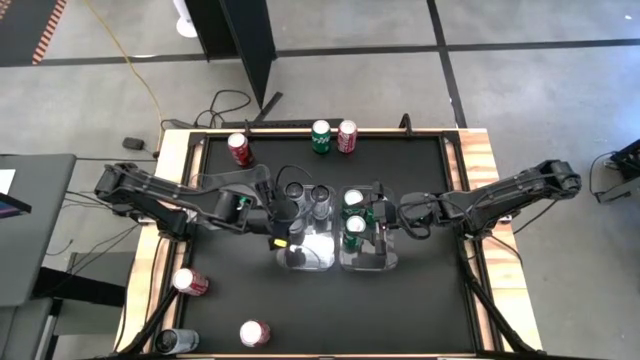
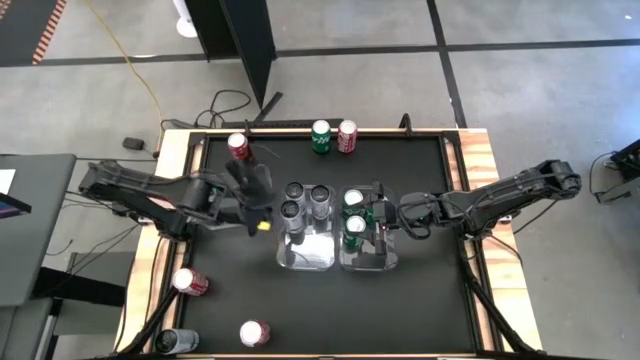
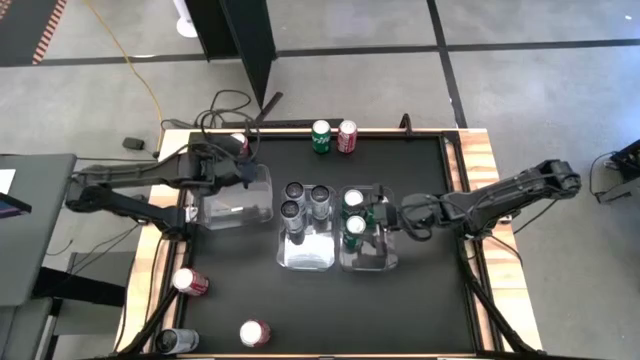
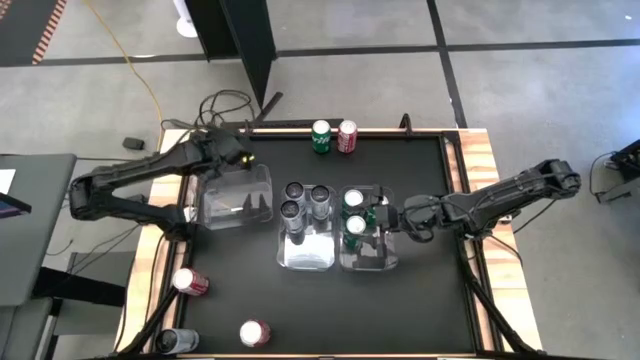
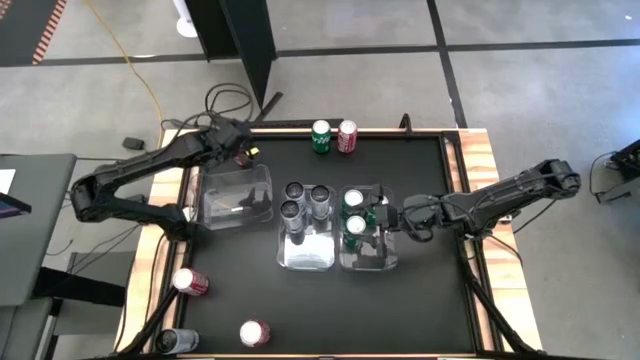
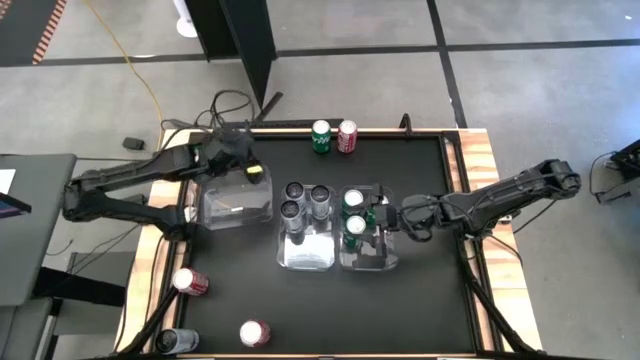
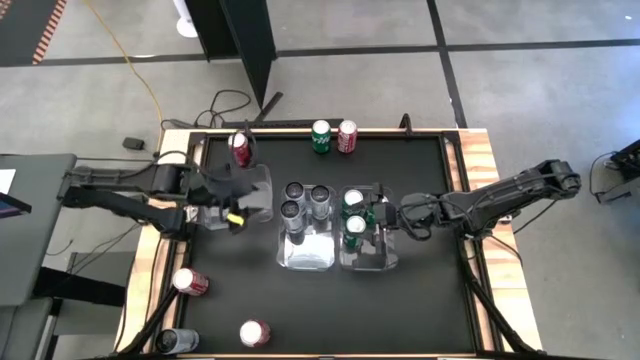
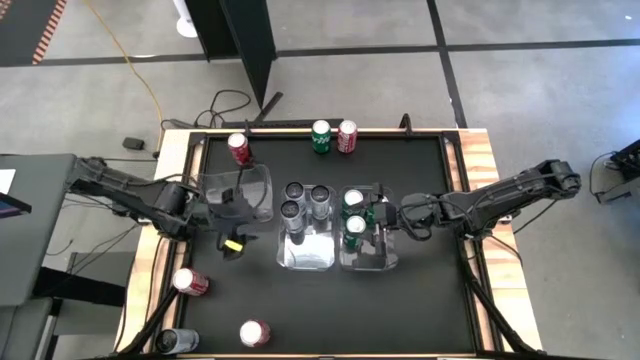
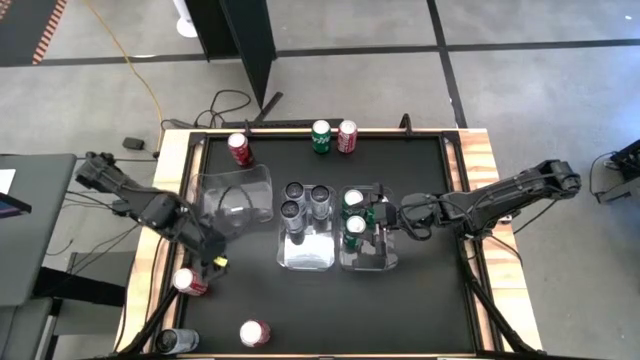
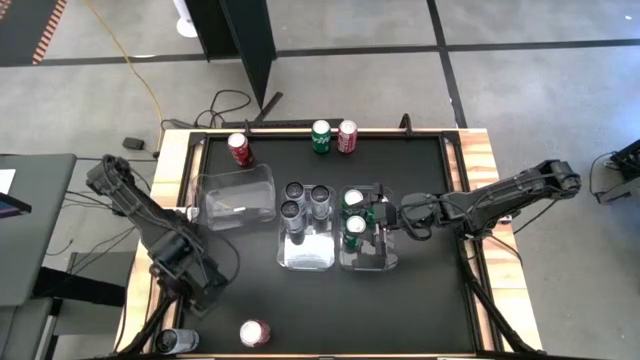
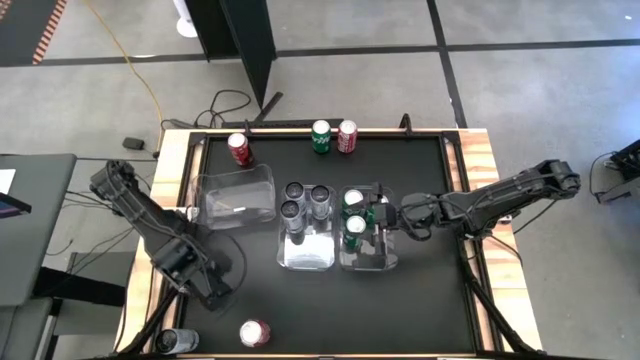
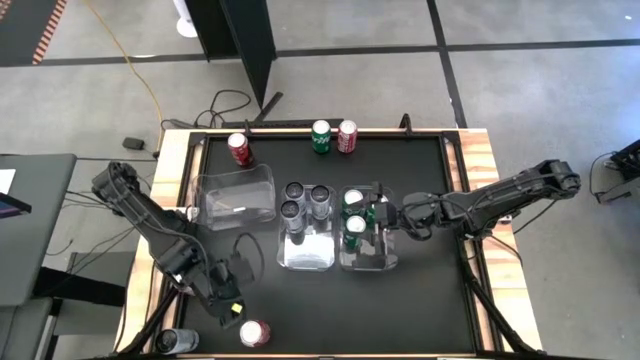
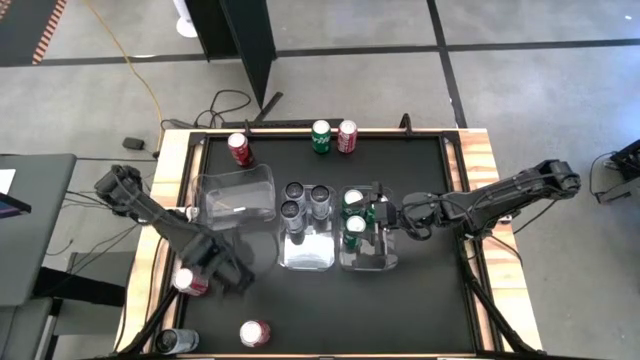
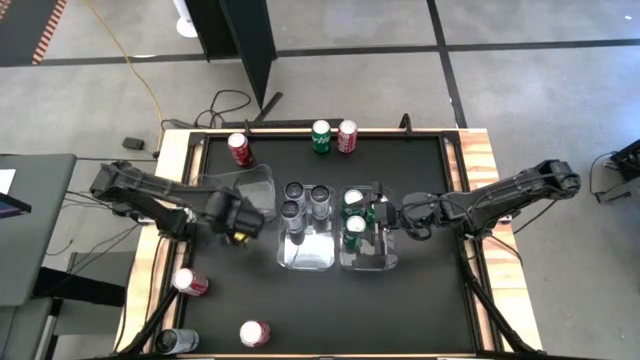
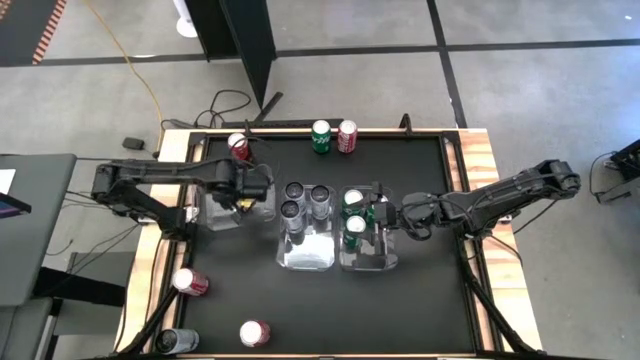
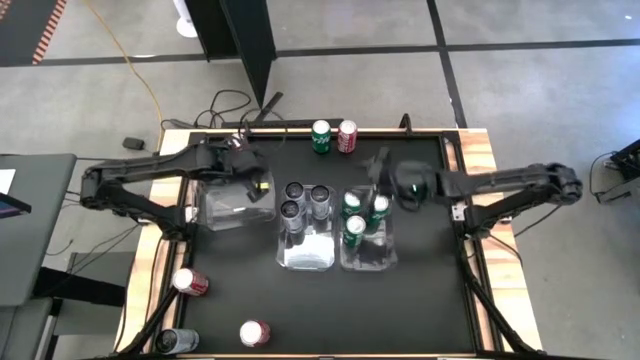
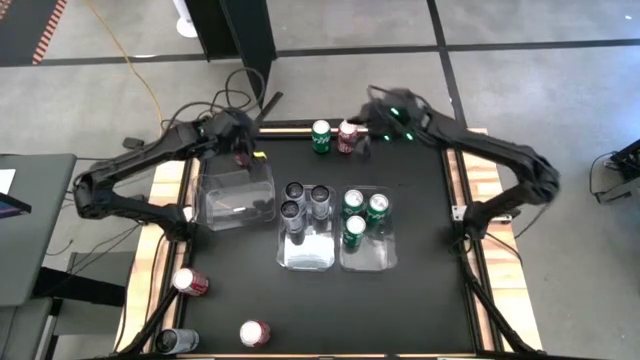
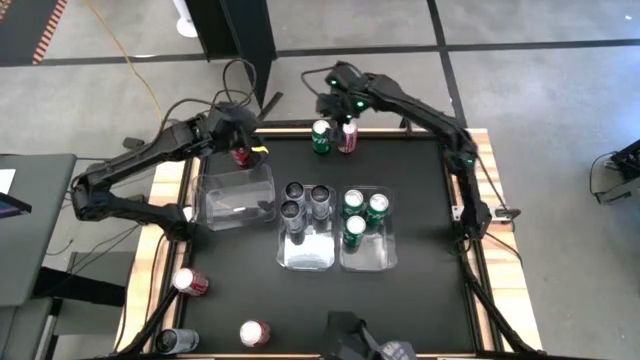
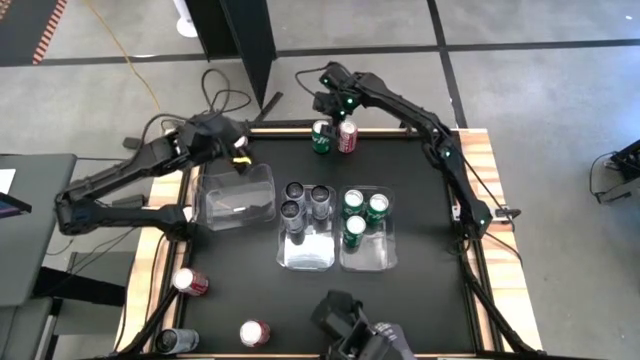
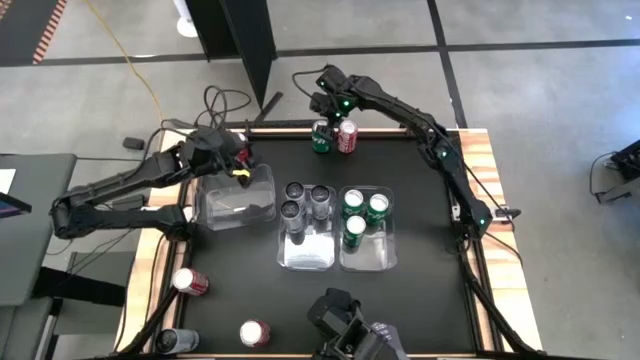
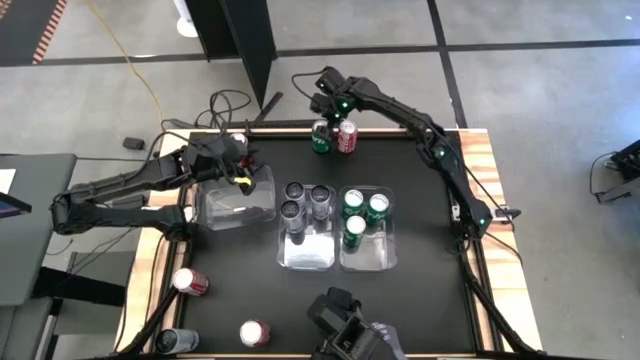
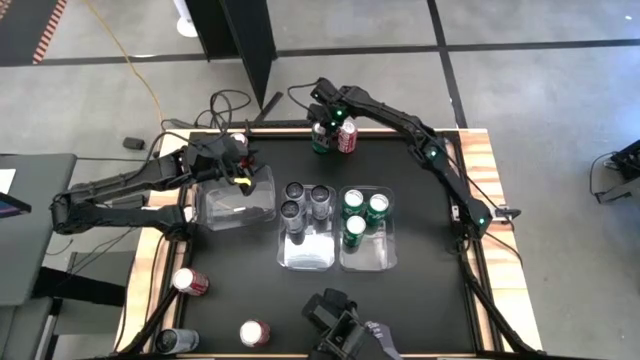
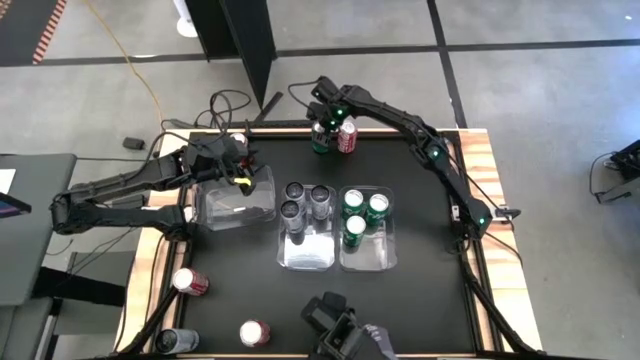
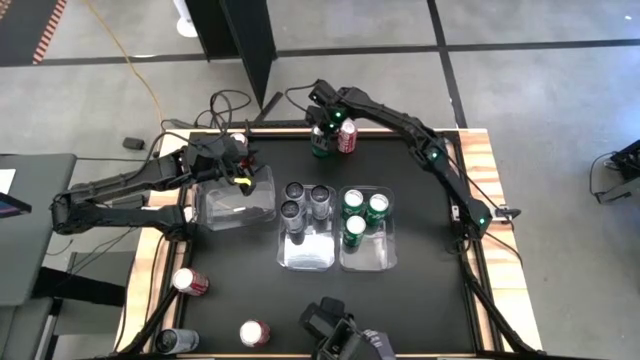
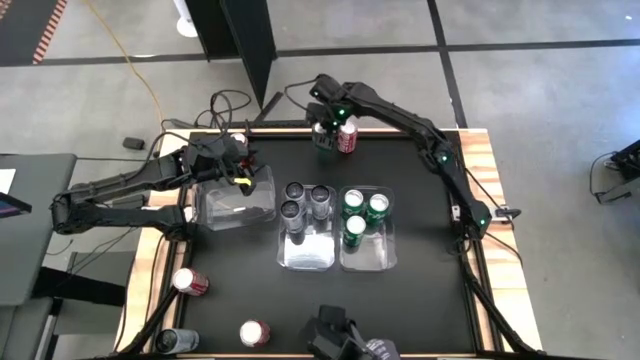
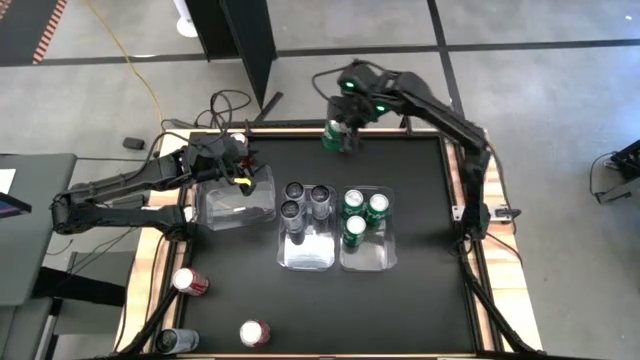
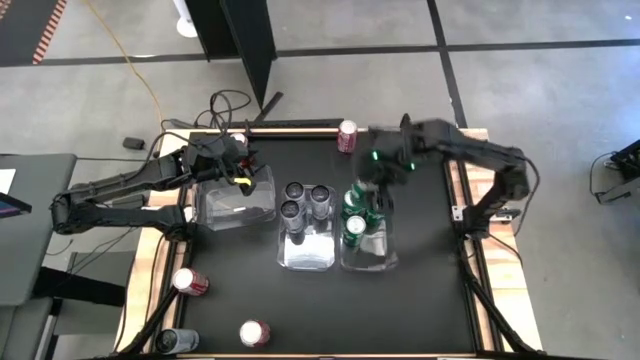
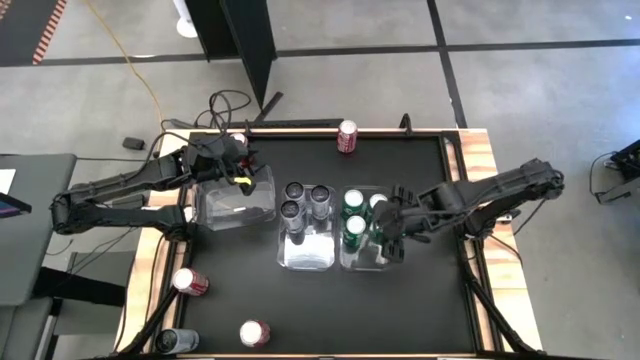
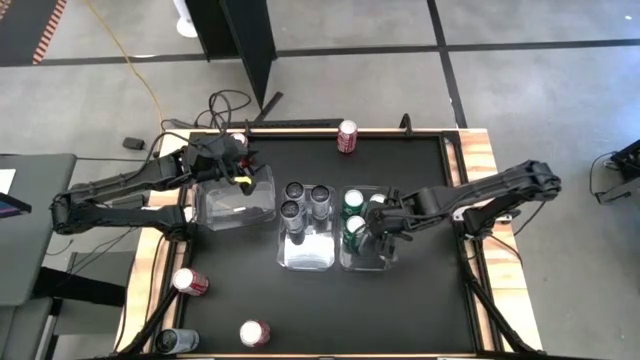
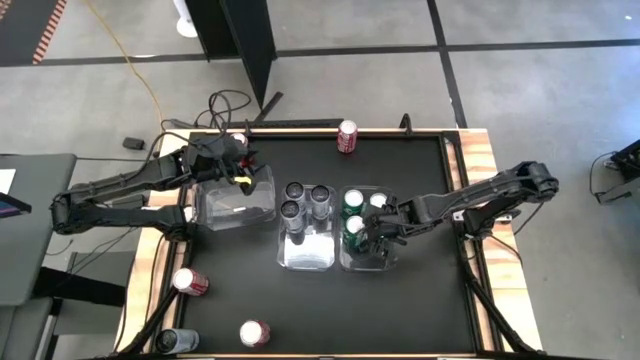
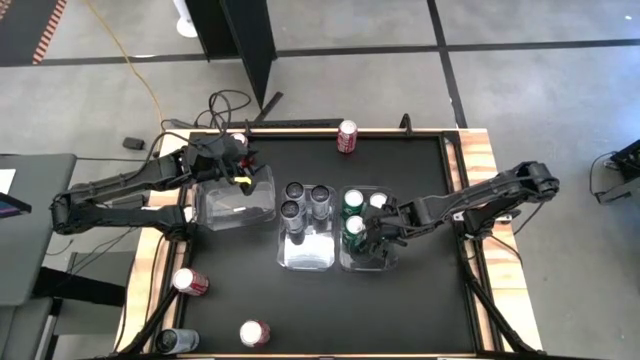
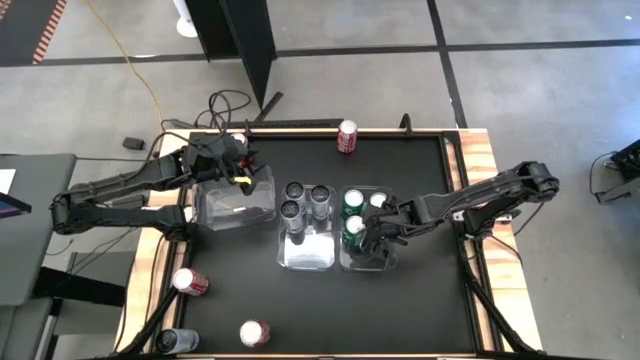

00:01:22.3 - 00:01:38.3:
Task: Sort soda cans
Put the green soda can into the right transparent bin

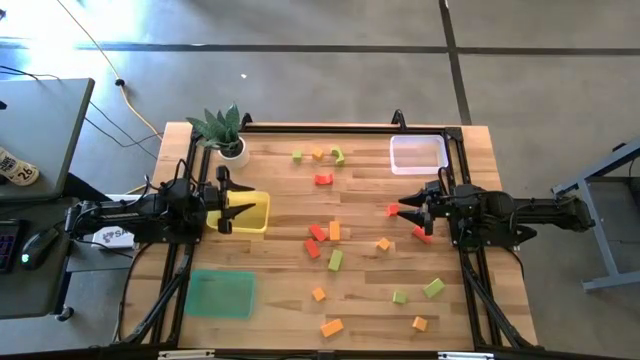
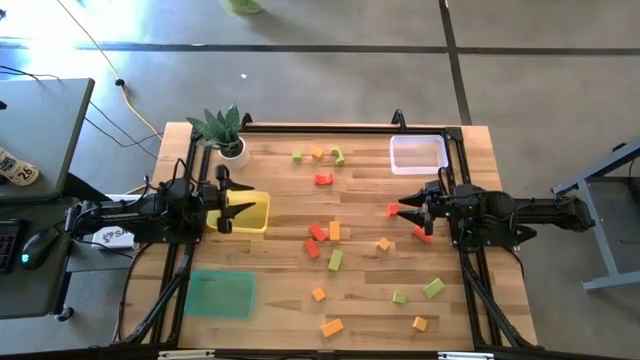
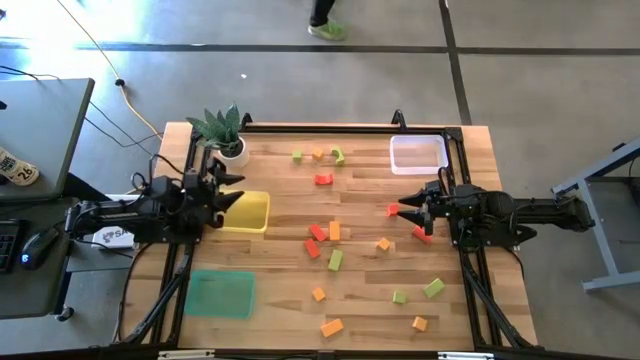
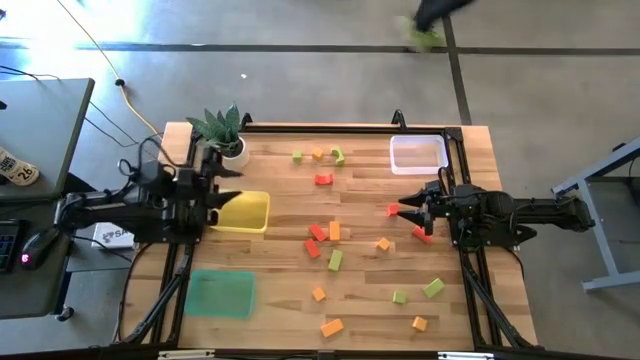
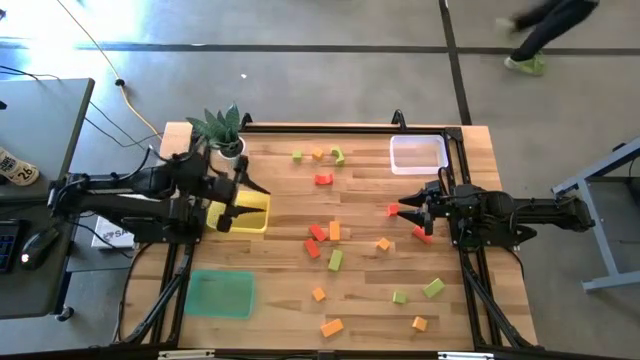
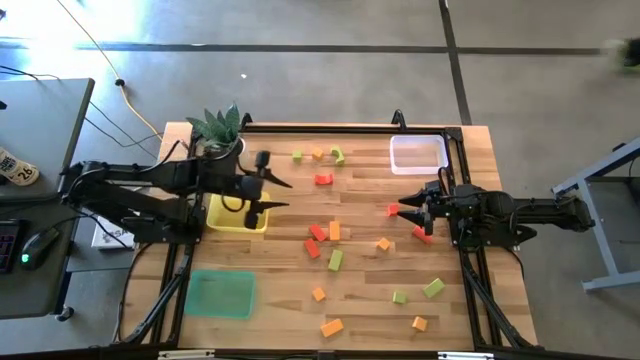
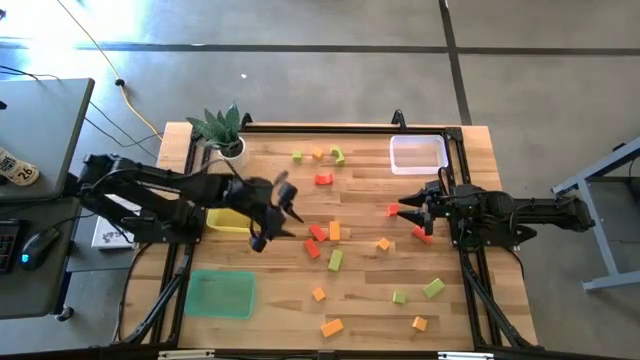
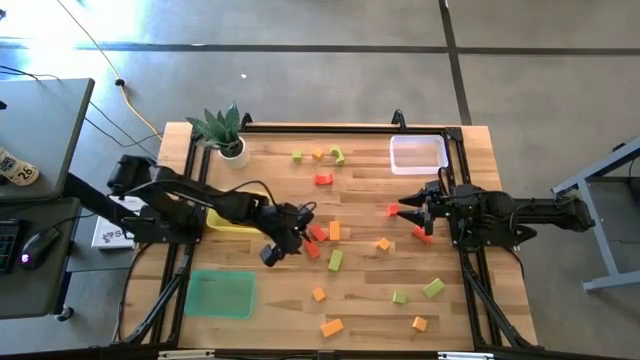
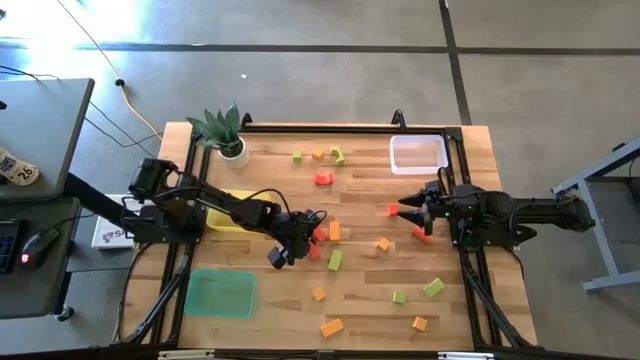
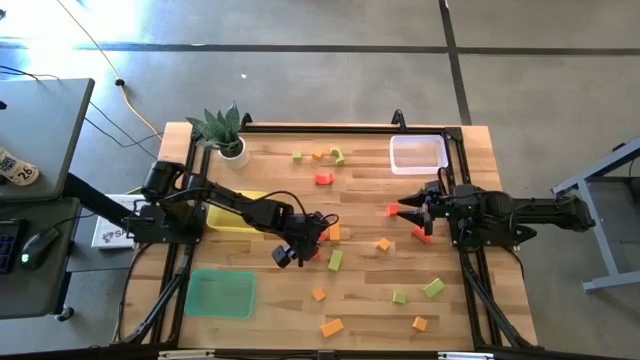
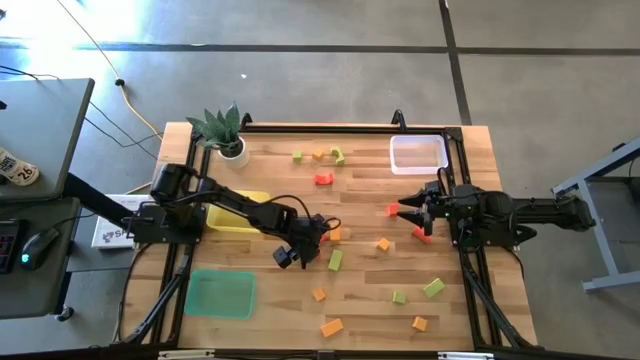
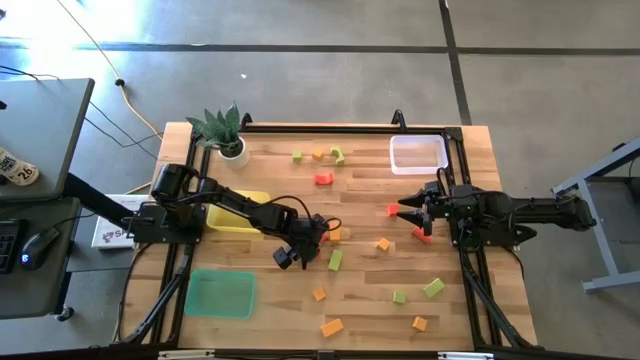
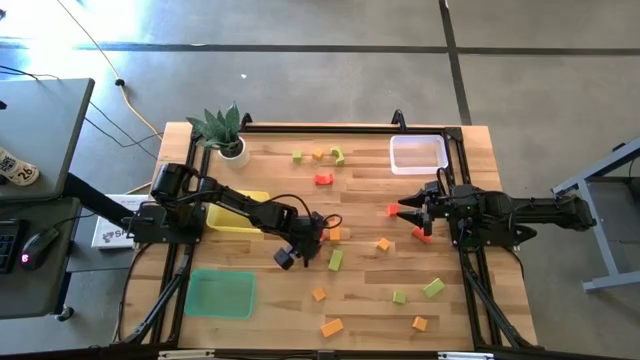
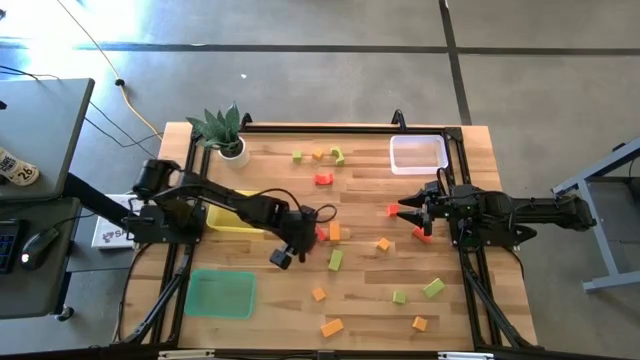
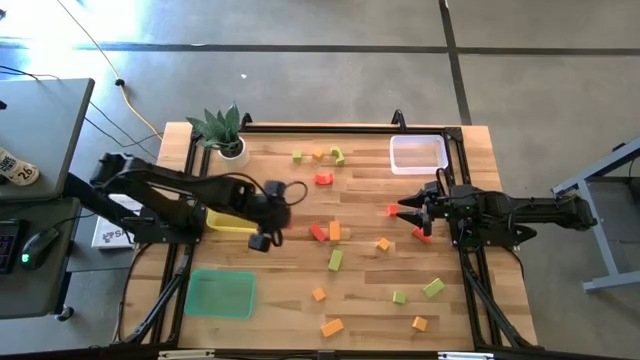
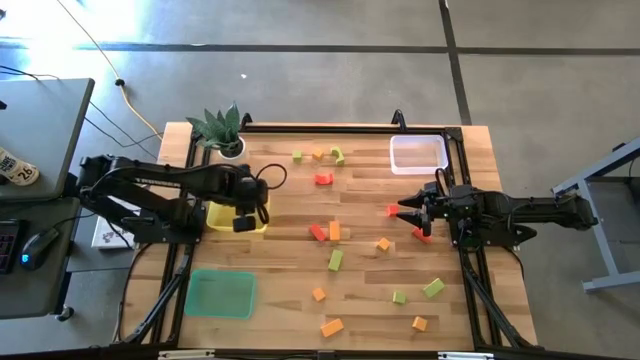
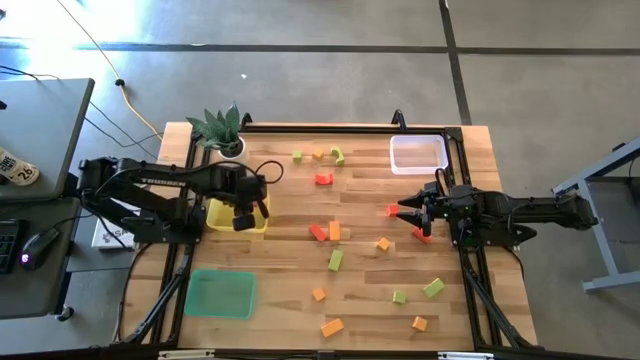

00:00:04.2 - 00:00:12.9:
Task: Sort & place blocks by color
Put the orange block into the yellow bin
